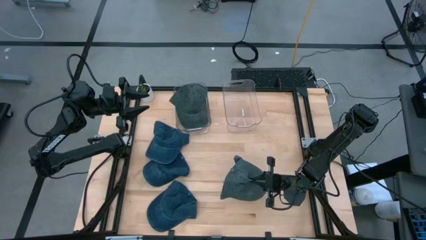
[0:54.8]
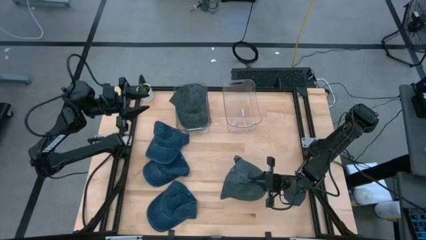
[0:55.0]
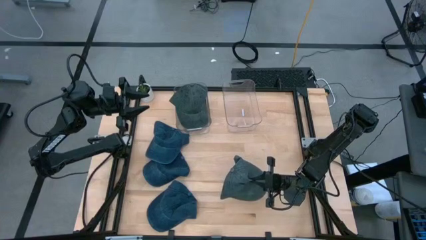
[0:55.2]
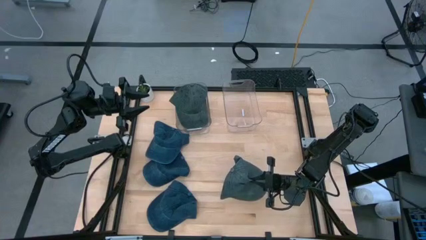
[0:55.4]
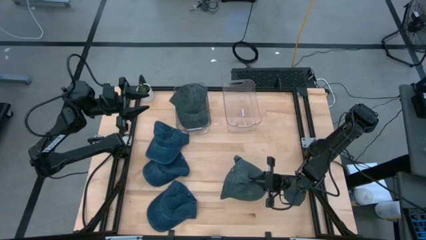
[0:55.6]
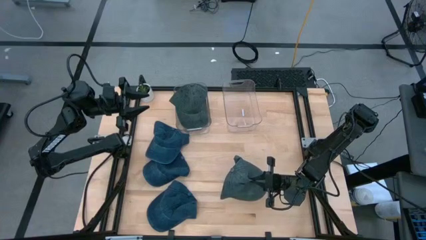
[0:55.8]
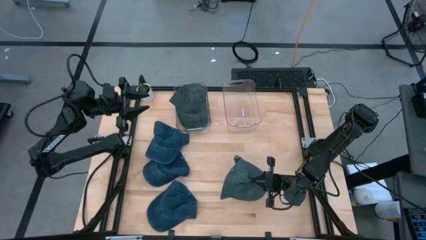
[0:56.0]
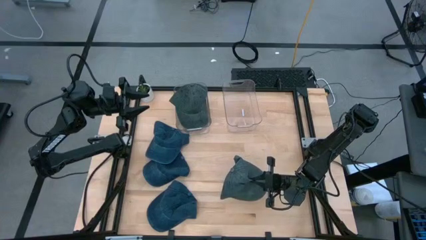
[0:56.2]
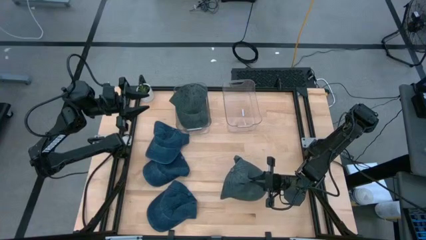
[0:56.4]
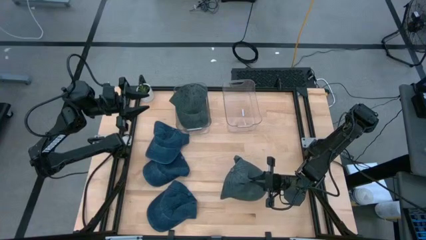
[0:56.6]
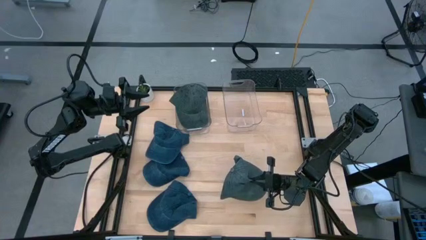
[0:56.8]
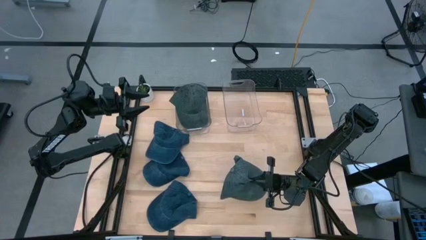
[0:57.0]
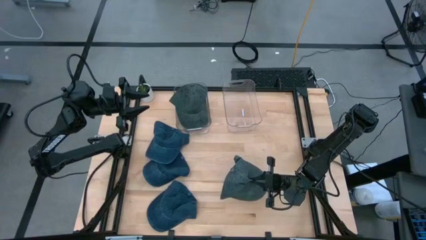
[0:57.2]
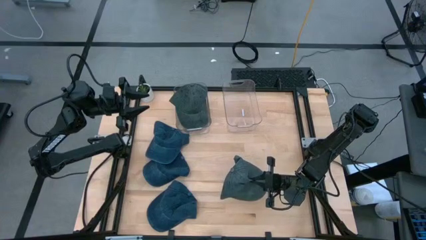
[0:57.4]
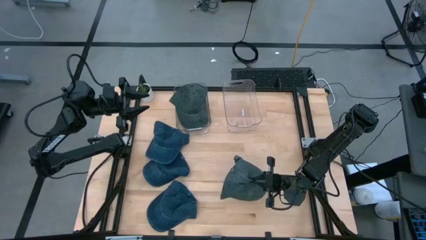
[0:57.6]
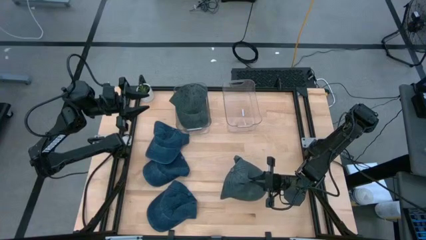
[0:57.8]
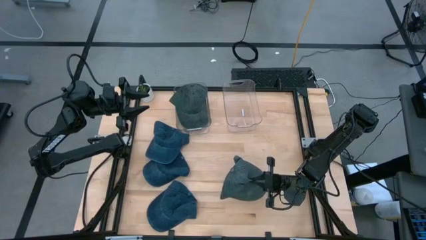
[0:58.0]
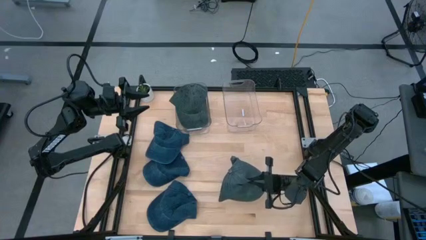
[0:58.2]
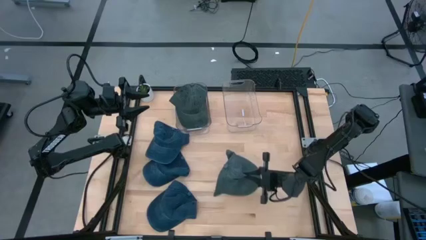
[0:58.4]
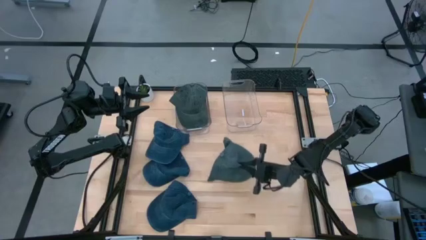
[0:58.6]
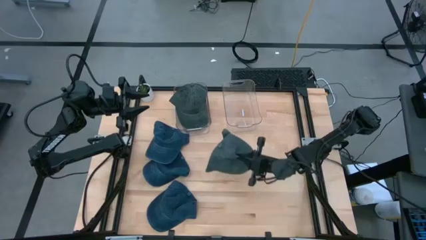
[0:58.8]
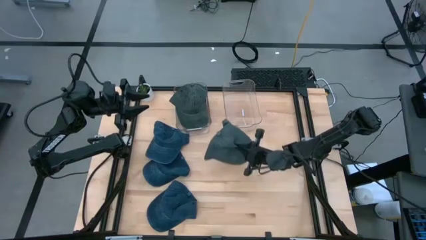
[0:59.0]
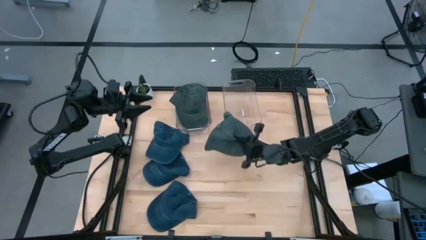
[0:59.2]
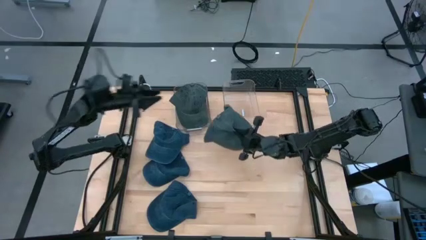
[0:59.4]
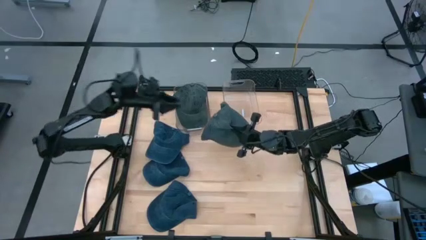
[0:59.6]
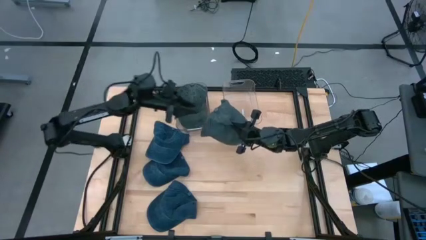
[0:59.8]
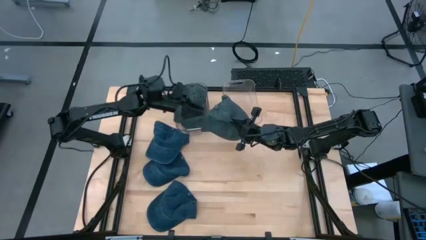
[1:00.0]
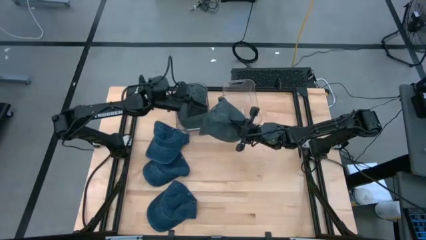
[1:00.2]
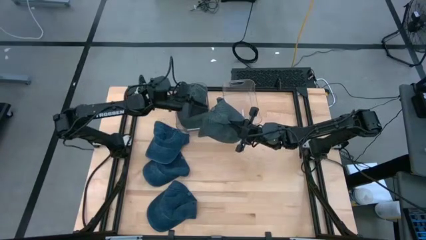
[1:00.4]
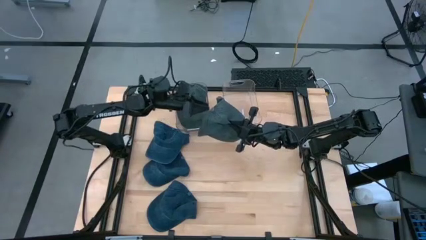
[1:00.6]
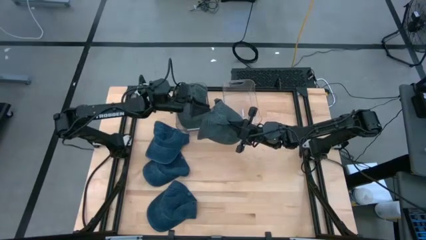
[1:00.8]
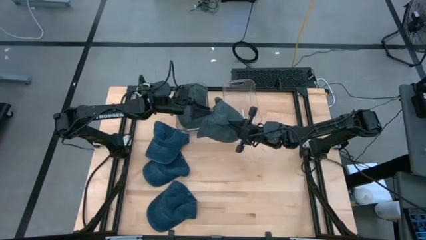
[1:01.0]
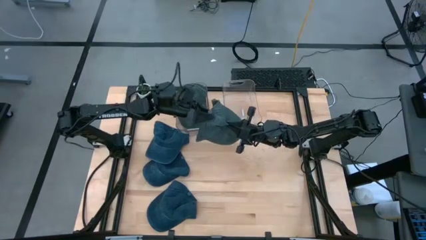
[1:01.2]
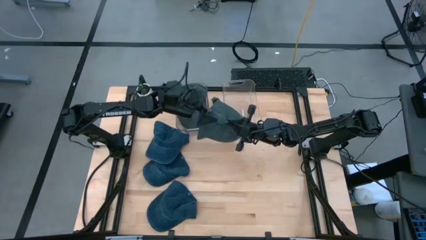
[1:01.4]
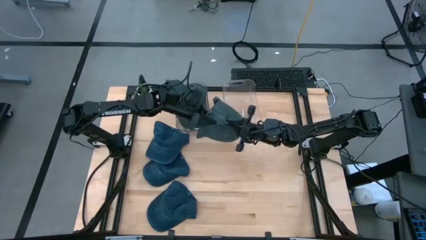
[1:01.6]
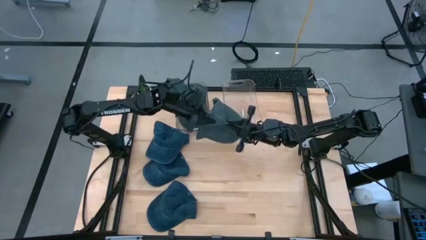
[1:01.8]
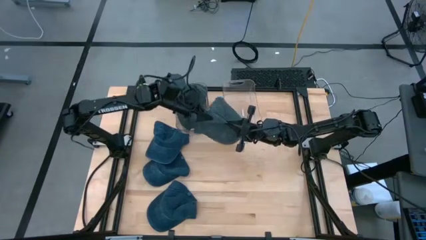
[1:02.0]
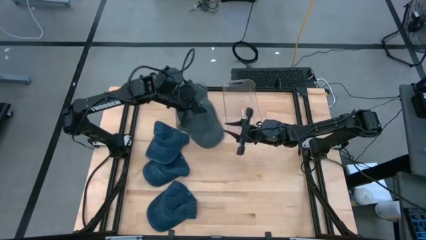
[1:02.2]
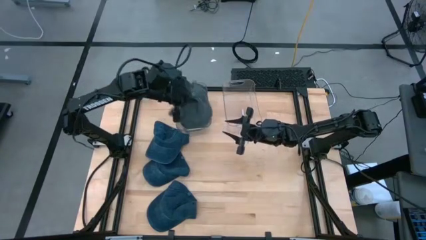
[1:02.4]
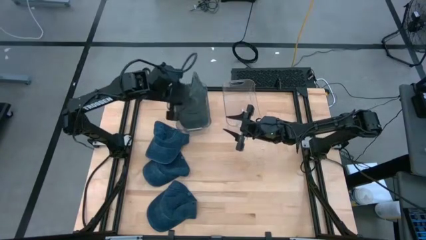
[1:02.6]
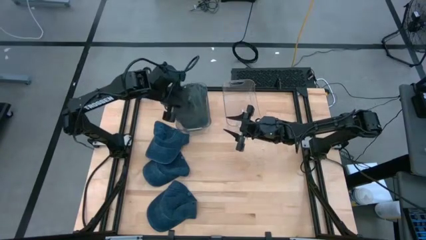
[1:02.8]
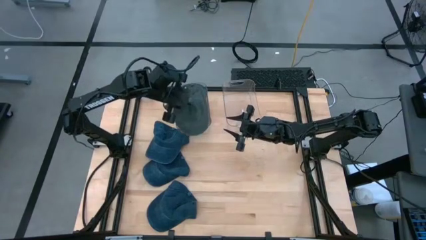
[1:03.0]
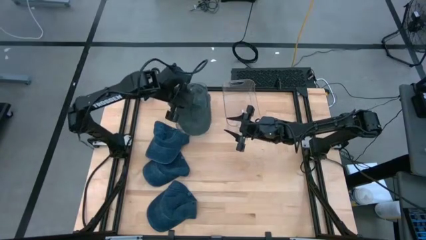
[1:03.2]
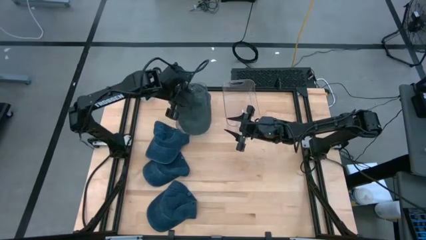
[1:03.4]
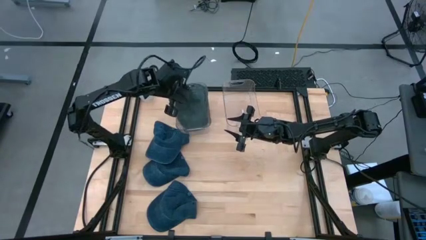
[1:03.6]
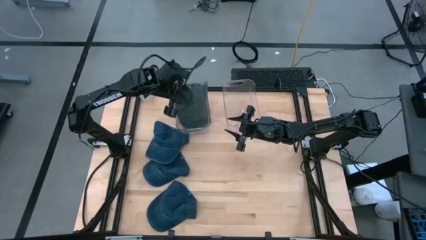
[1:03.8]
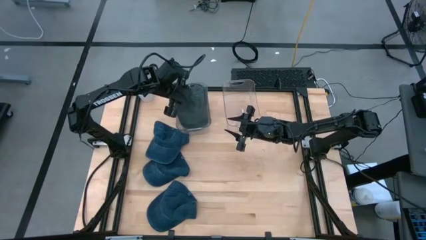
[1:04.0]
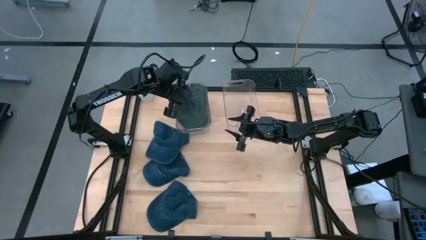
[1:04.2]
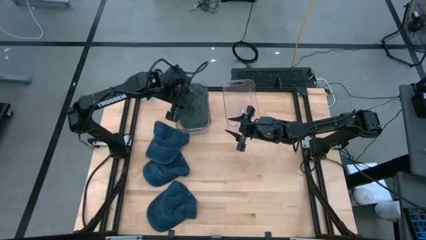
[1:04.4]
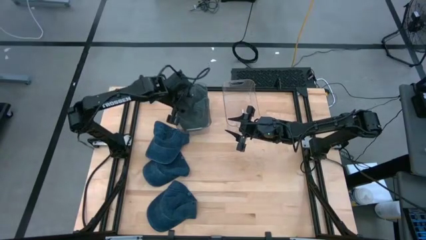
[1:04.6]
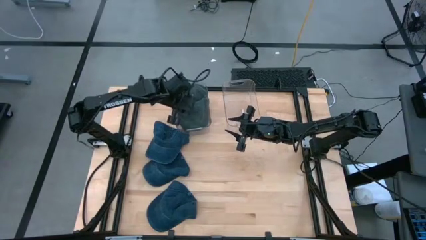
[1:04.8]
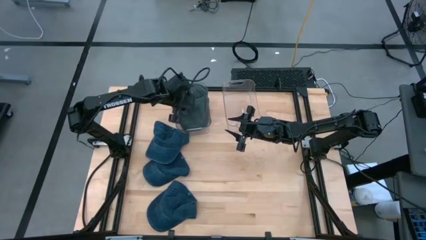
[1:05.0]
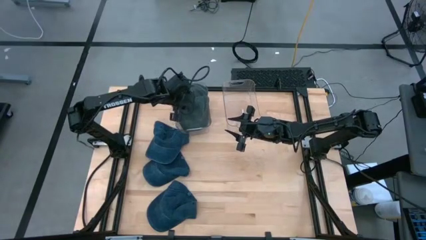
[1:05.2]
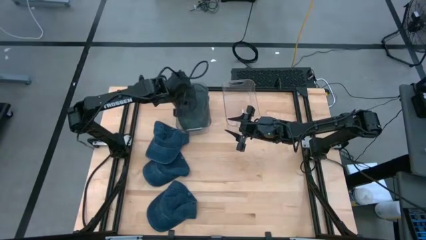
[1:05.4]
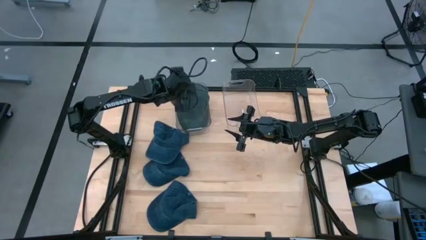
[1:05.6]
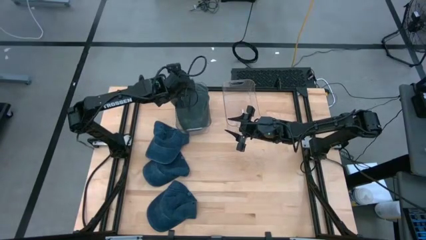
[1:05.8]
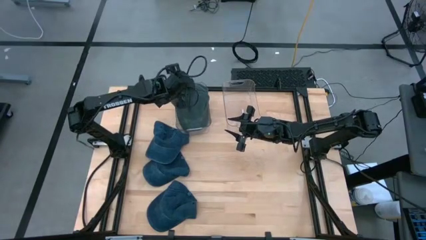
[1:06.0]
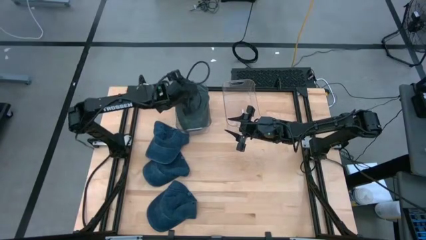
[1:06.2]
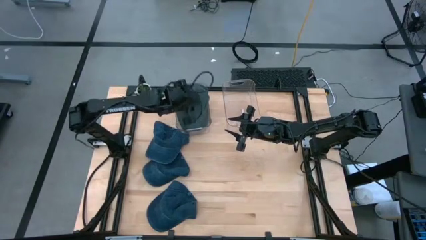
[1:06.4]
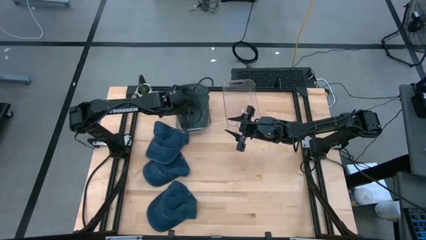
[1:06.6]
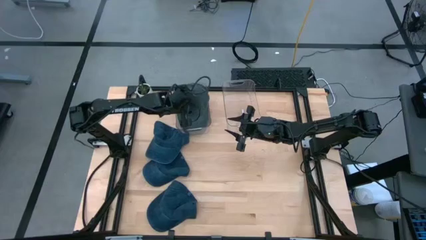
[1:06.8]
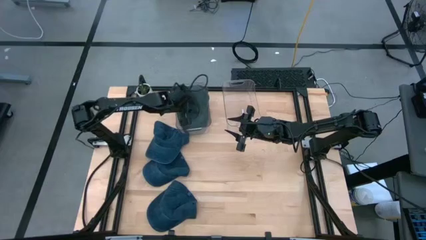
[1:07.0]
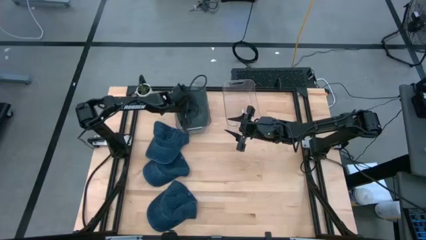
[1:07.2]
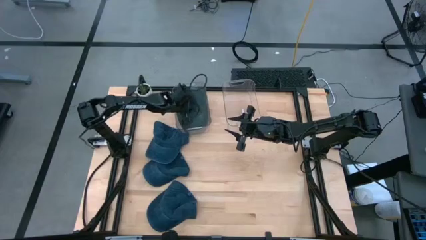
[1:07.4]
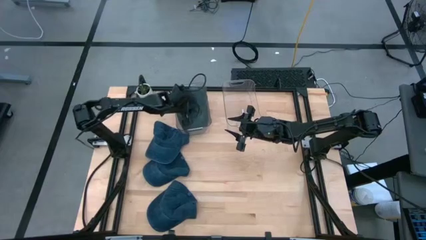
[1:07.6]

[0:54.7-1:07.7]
Task: Pick & Place hat
Put the gray cap into the left transparent bin
